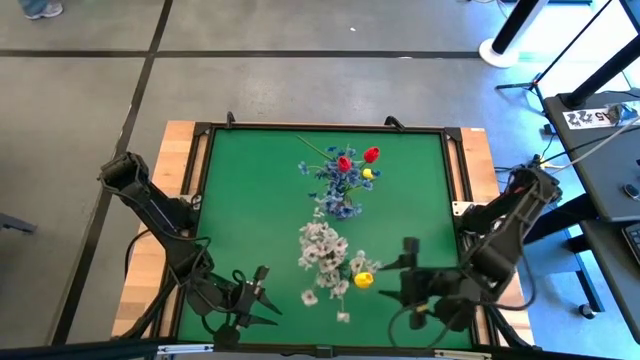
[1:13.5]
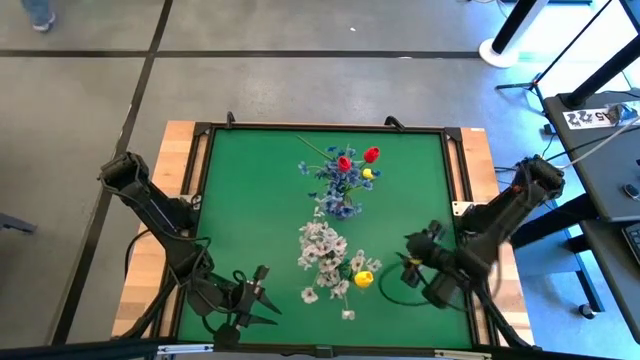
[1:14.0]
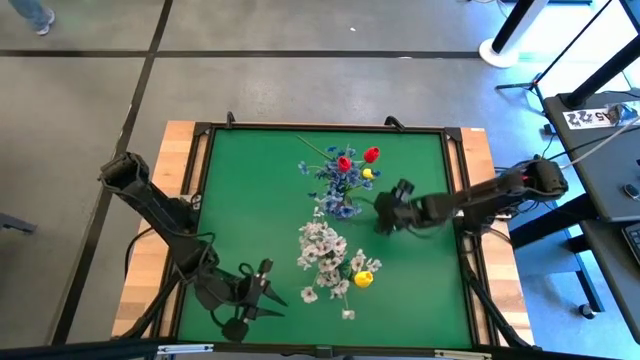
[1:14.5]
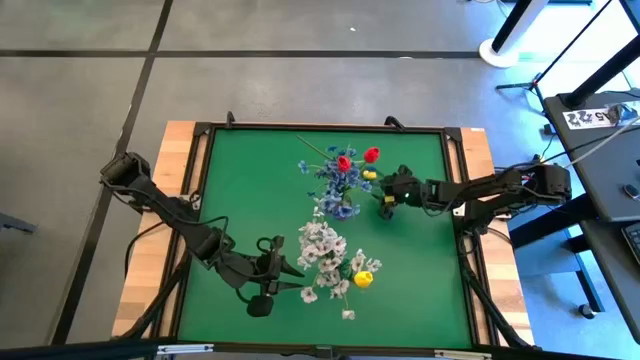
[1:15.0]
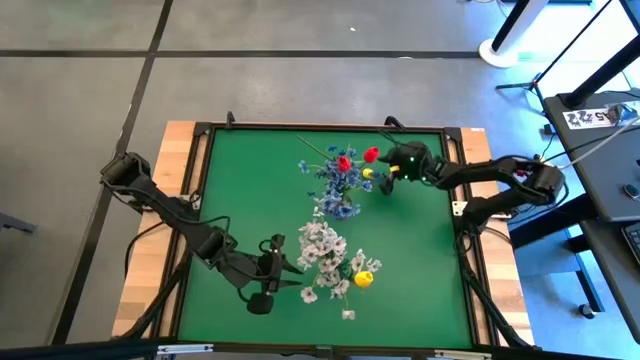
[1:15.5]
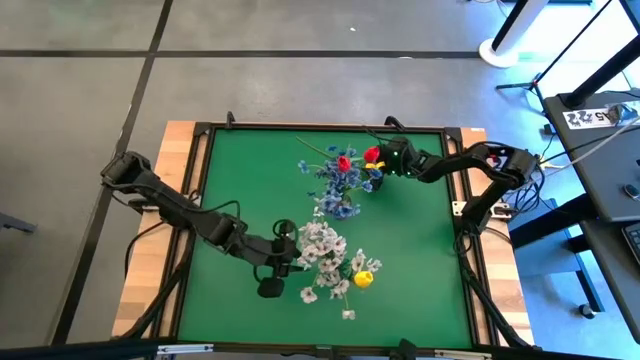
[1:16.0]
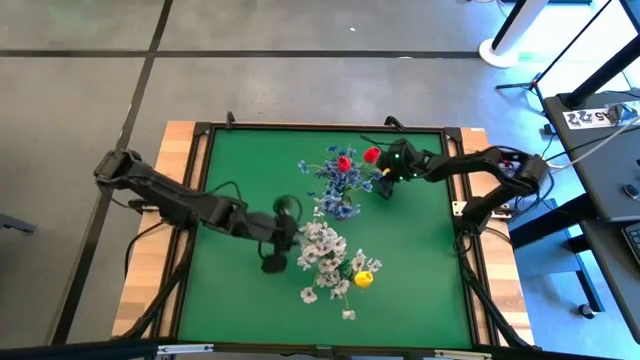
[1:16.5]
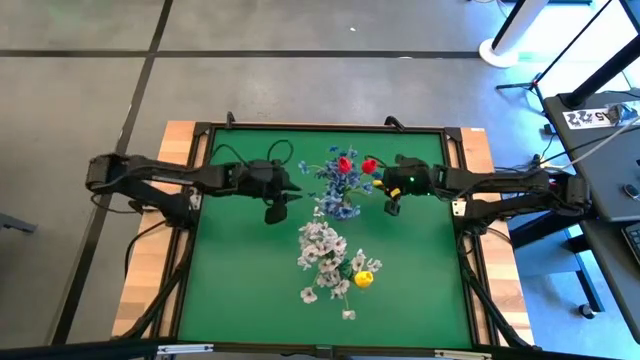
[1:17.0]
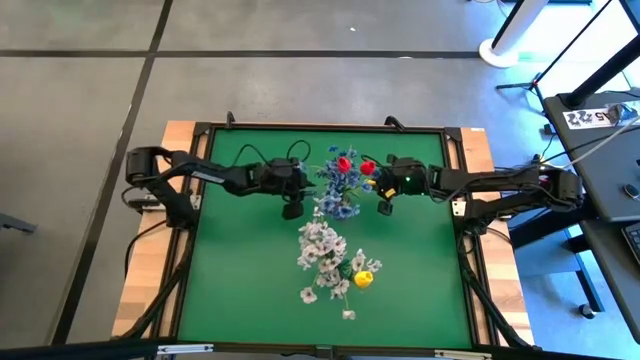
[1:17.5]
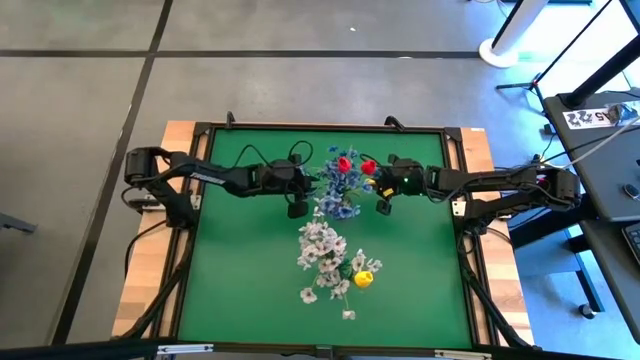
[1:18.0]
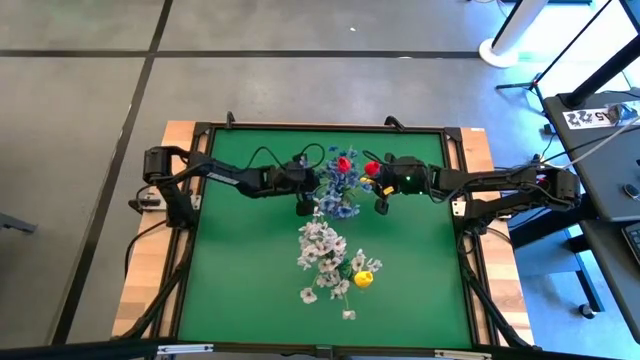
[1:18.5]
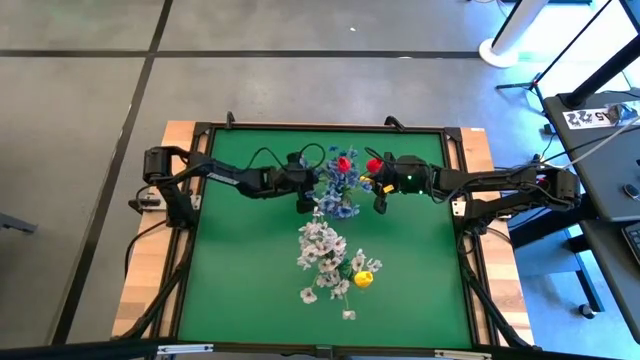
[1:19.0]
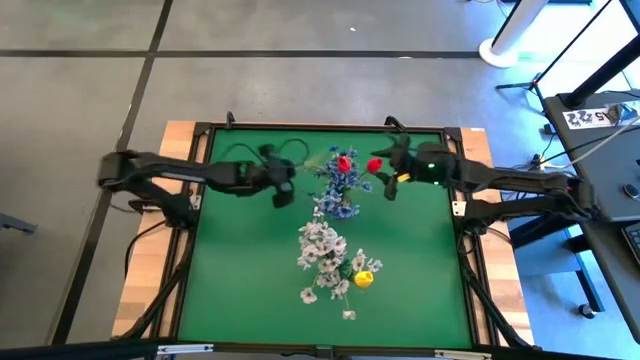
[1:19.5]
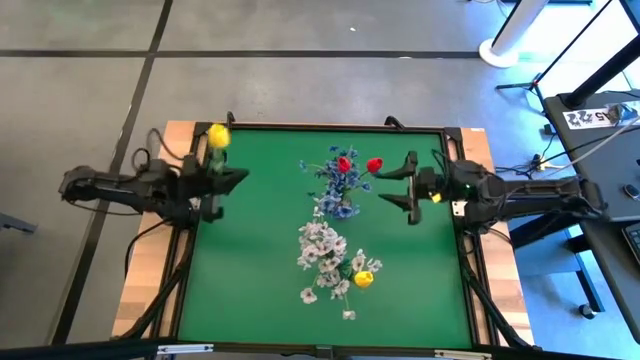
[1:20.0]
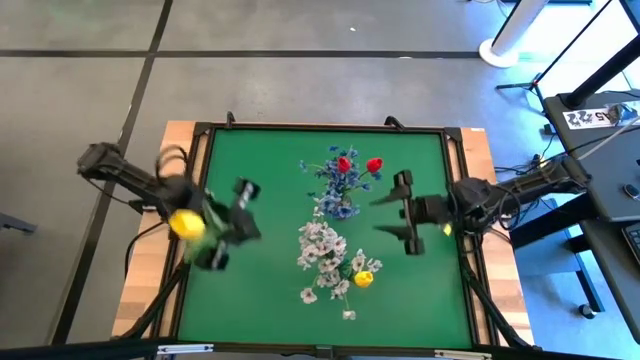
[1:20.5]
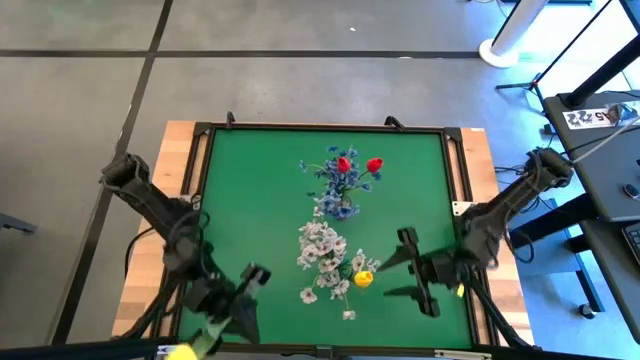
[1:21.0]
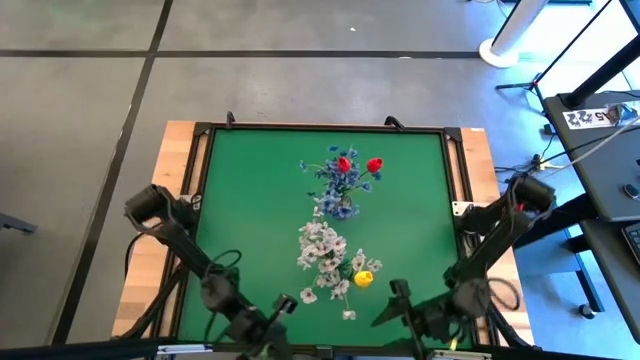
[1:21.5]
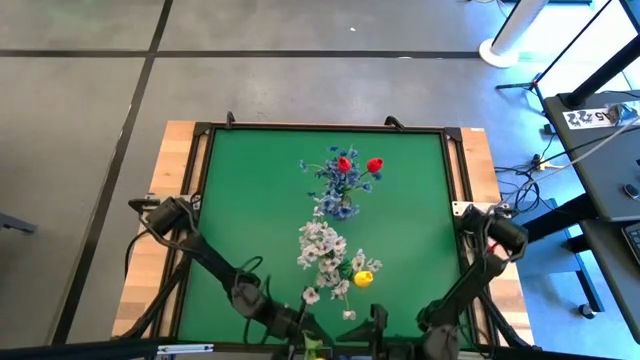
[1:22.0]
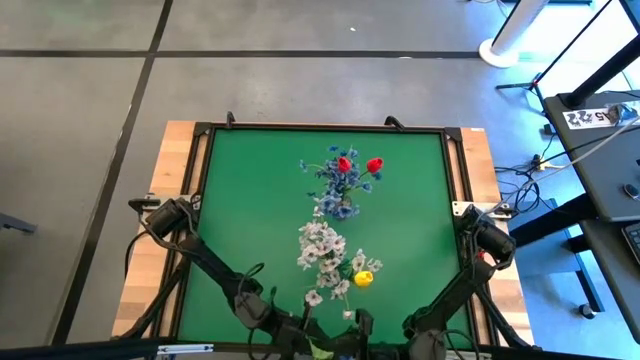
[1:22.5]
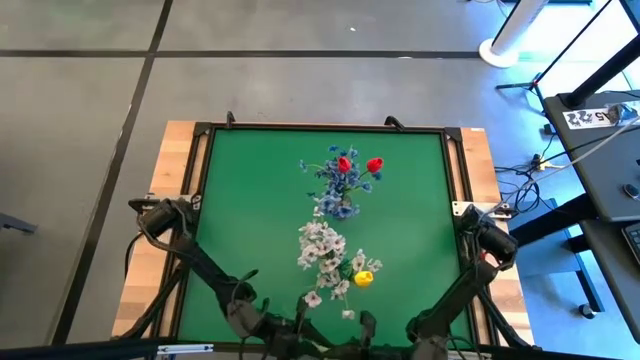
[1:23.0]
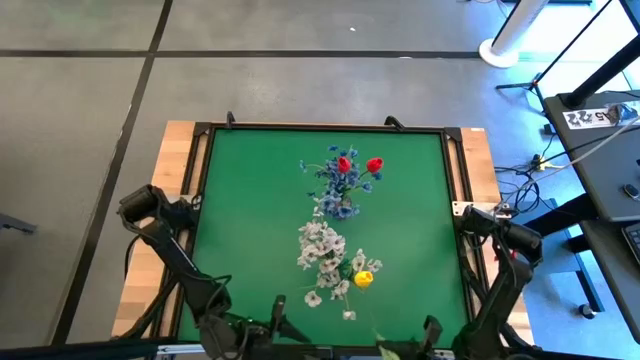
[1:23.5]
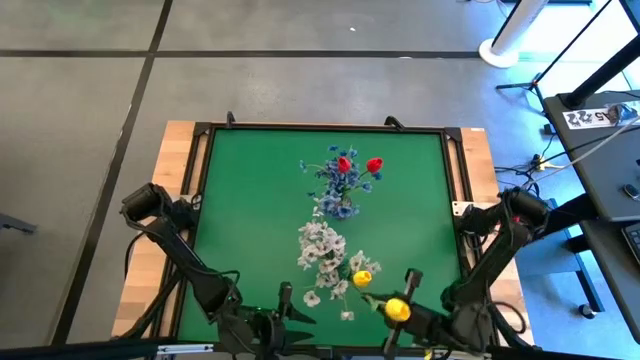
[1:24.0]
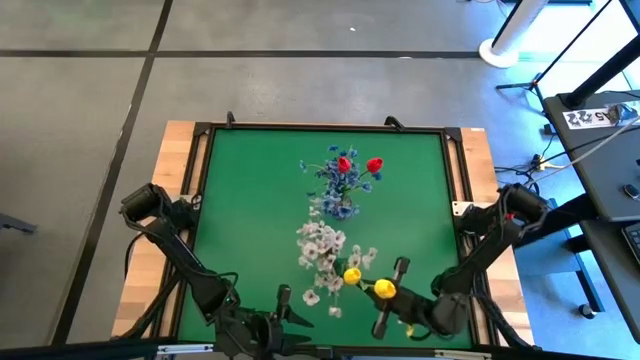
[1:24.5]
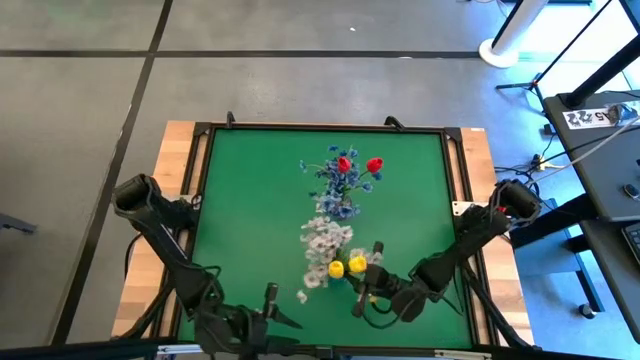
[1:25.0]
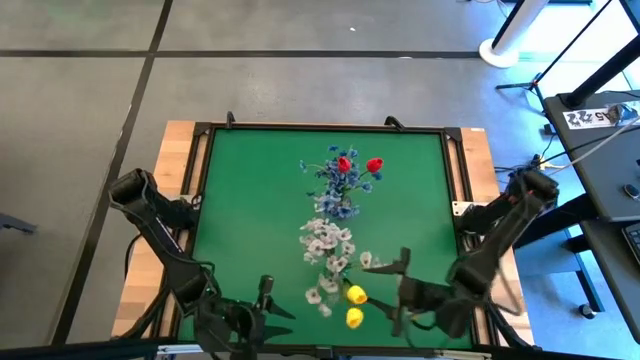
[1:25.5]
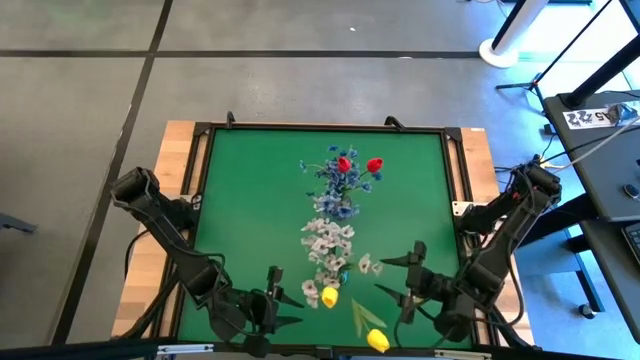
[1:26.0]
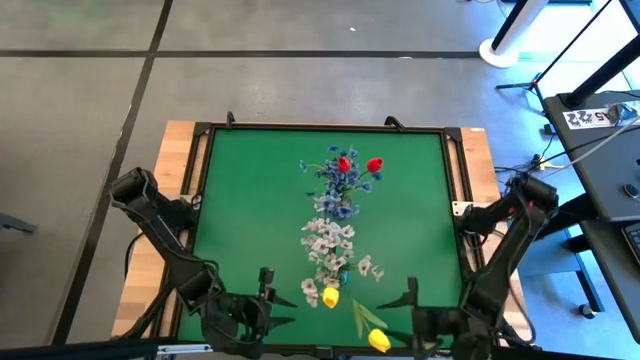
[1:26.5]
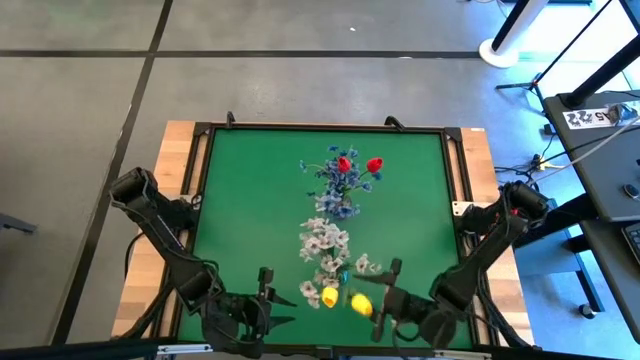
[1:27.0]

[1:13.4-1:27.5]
Task: Sort flowers into vase by color
Put the yellow flower into the blue vase

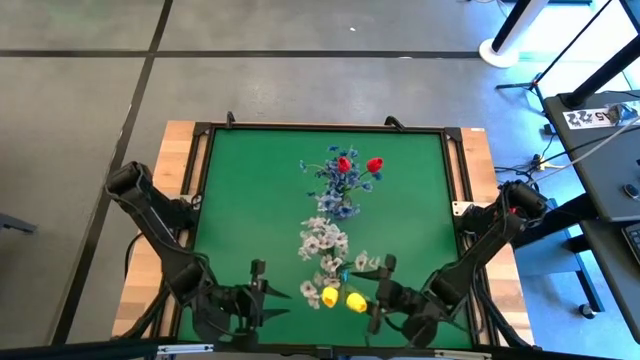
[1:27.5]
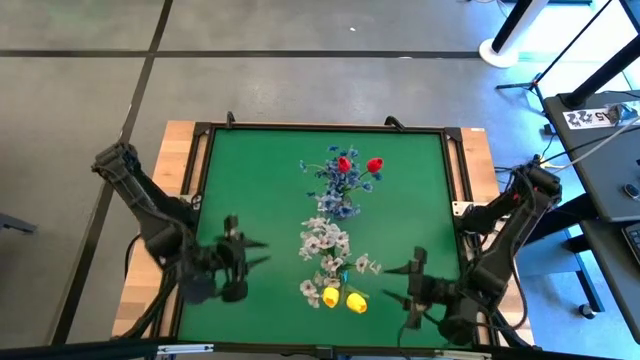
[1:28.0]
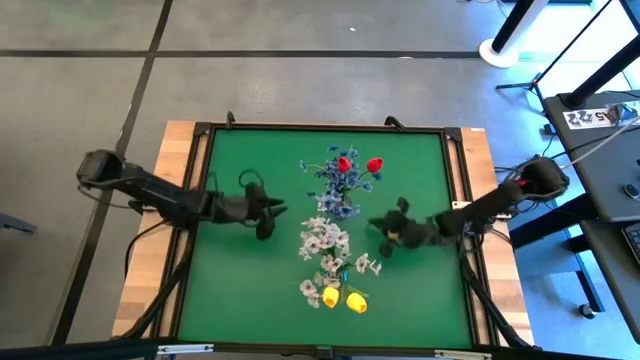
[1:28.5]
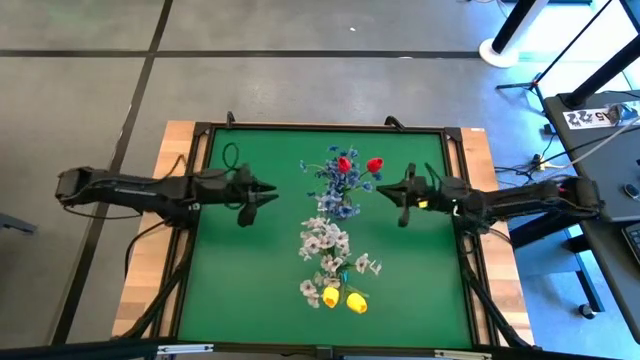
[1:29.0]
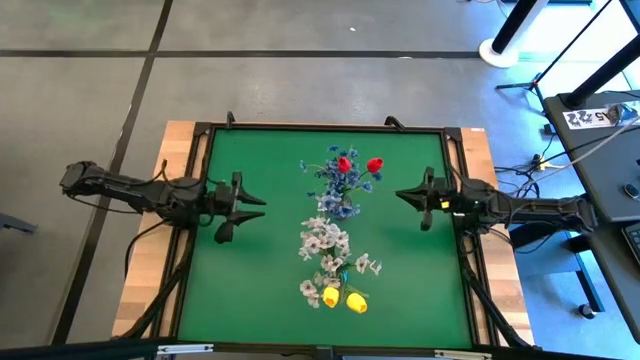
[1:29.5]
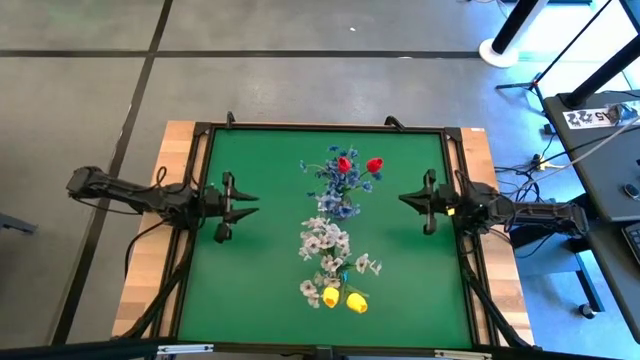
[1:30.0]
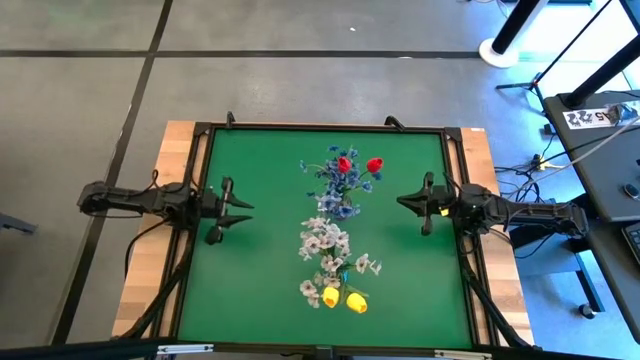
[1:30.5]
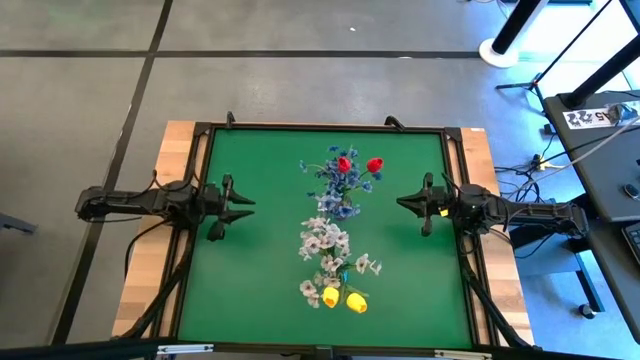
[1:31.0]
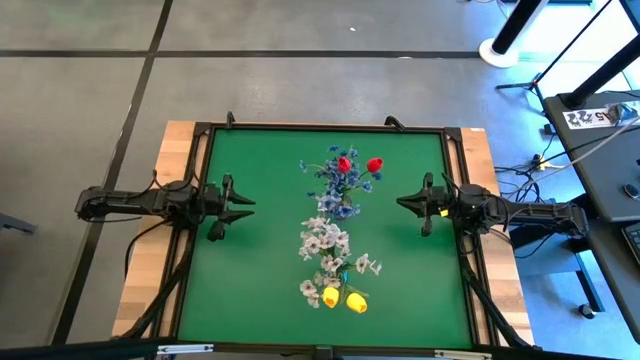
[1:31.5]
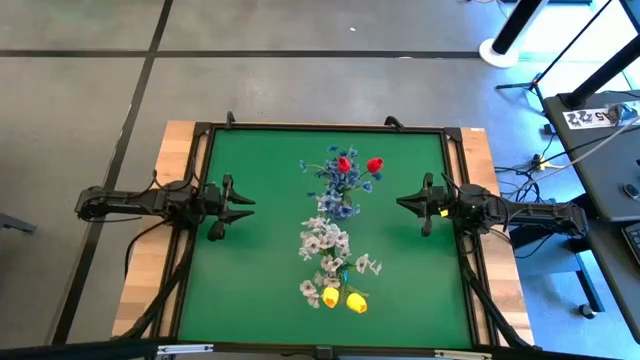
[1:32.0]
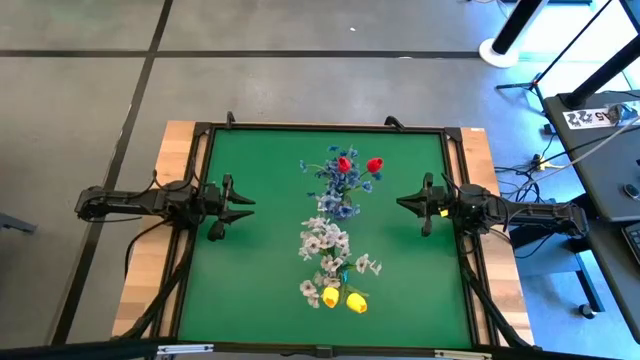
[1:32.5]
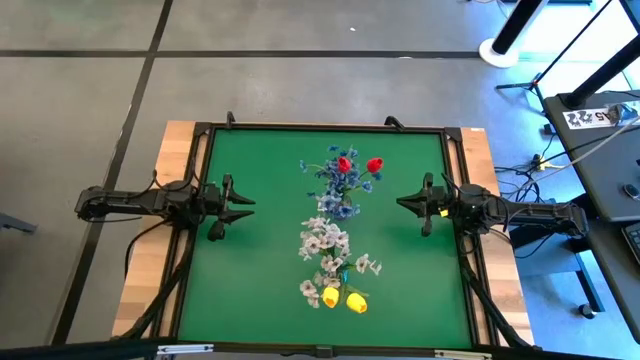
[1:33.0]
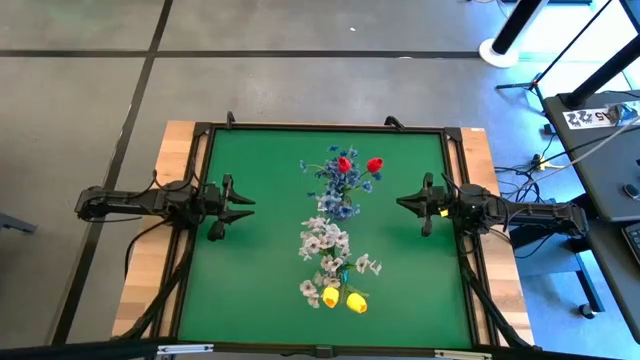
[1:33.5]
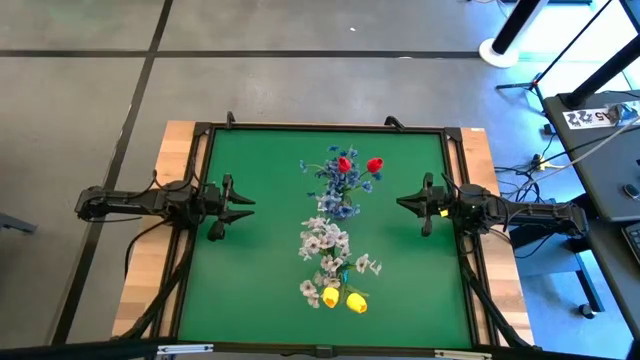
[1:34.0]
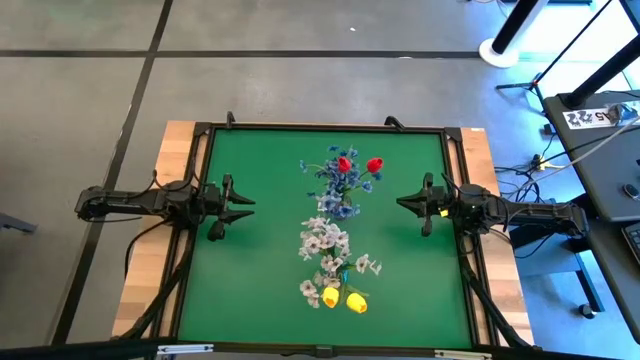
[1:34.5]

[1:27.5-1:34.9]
Return to Home Position
